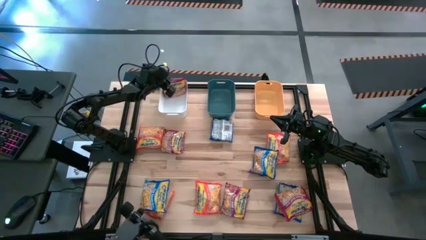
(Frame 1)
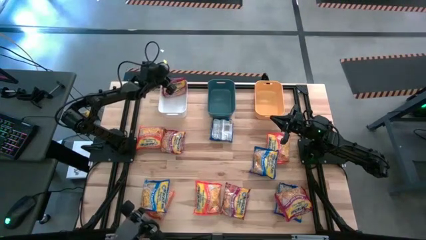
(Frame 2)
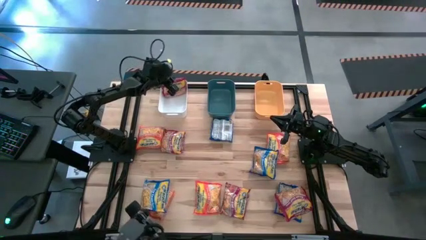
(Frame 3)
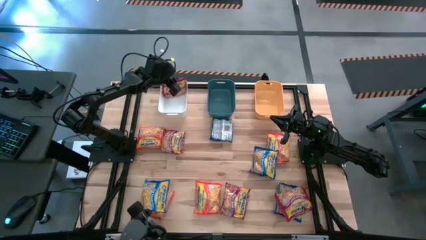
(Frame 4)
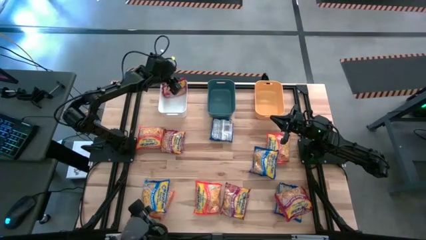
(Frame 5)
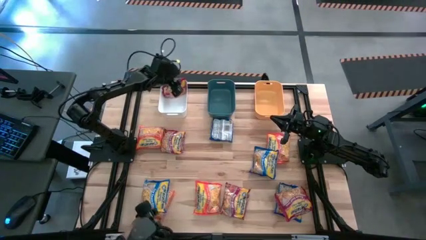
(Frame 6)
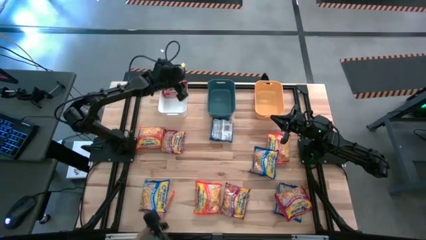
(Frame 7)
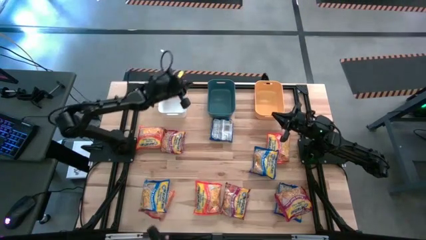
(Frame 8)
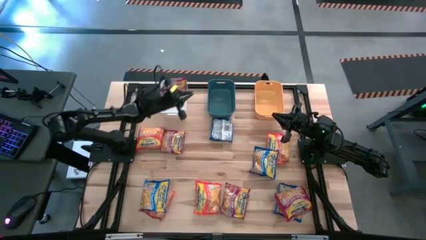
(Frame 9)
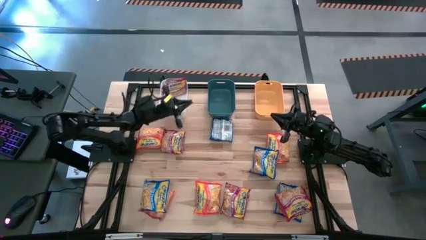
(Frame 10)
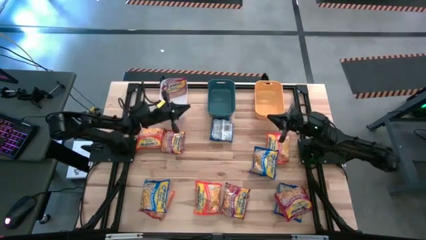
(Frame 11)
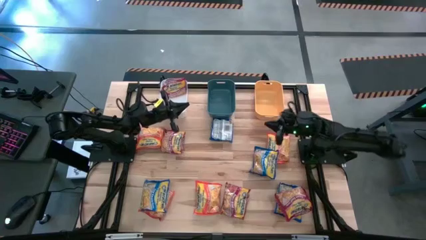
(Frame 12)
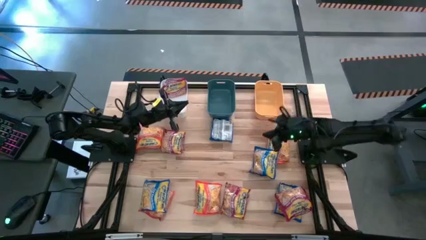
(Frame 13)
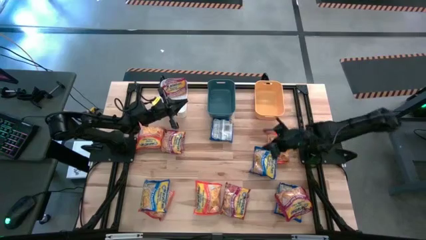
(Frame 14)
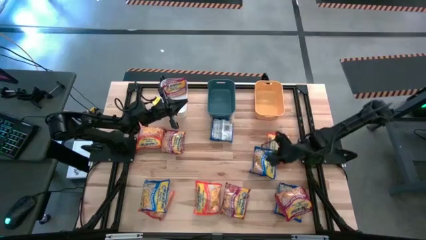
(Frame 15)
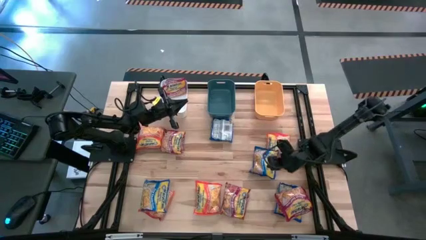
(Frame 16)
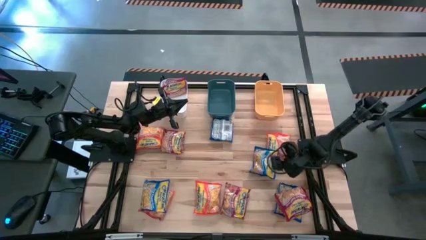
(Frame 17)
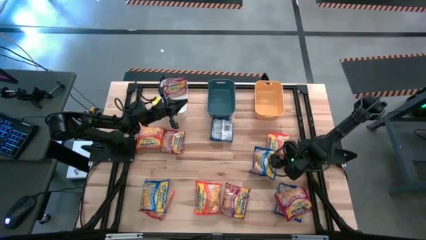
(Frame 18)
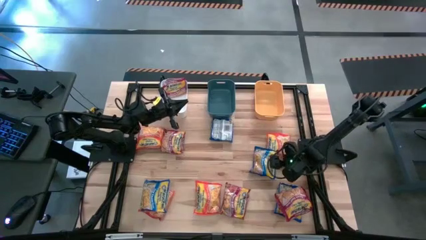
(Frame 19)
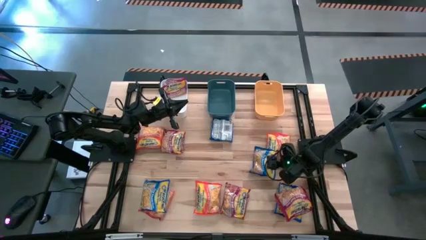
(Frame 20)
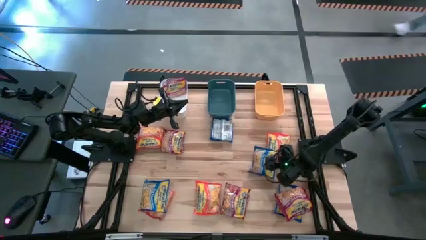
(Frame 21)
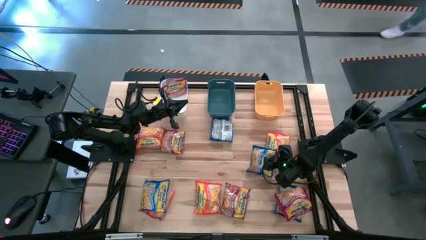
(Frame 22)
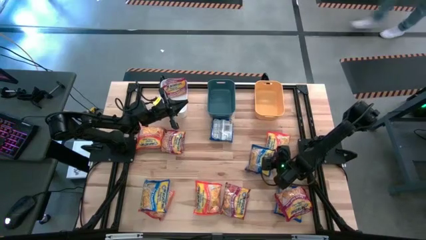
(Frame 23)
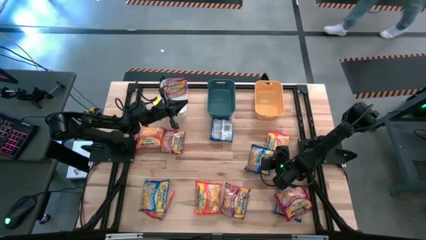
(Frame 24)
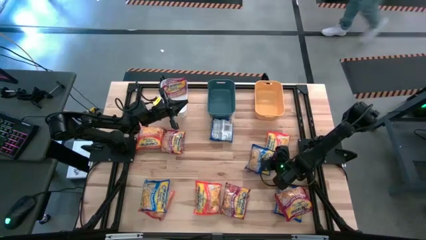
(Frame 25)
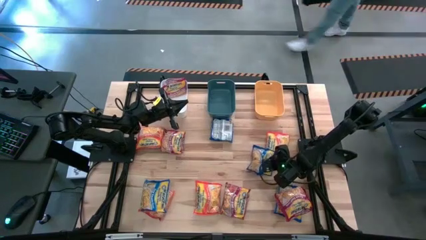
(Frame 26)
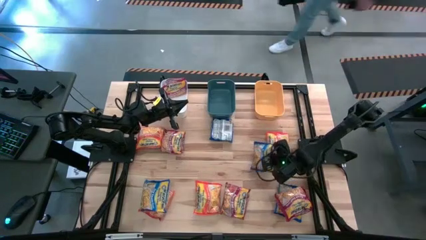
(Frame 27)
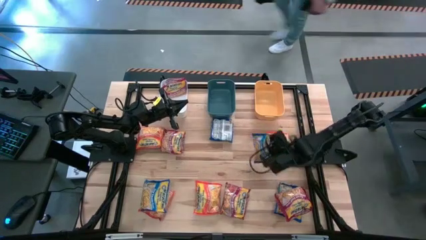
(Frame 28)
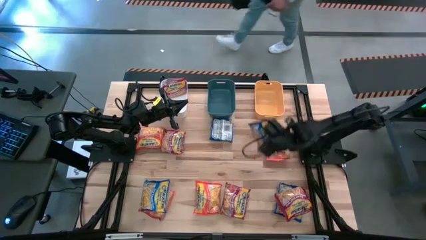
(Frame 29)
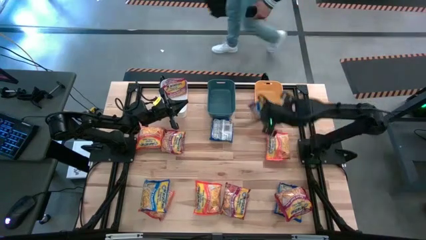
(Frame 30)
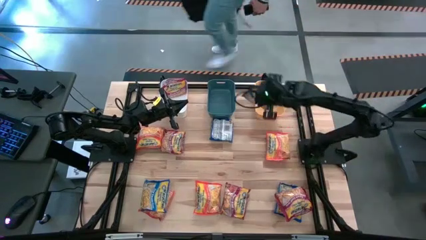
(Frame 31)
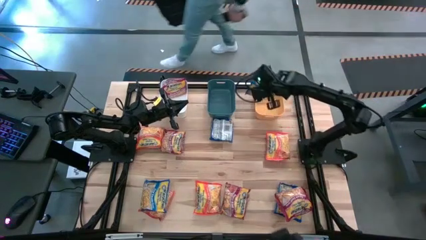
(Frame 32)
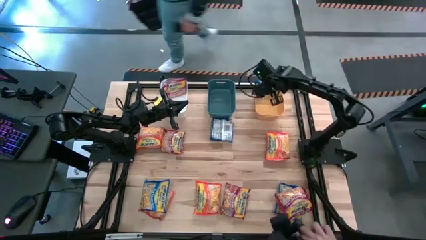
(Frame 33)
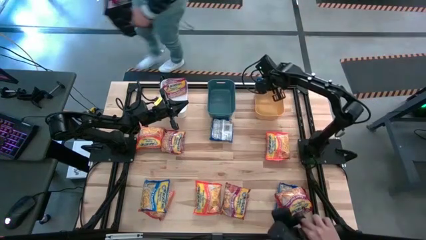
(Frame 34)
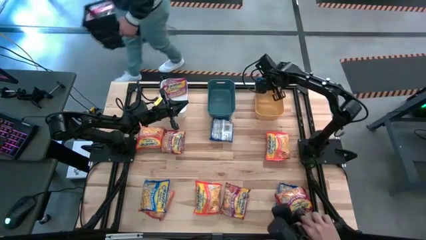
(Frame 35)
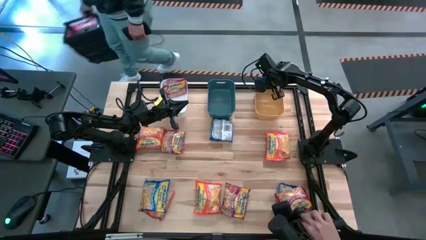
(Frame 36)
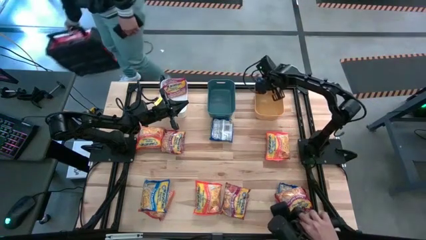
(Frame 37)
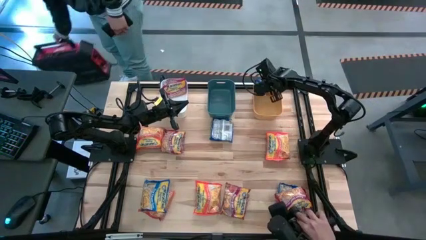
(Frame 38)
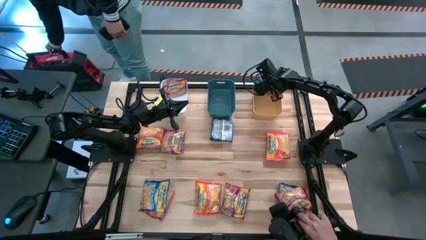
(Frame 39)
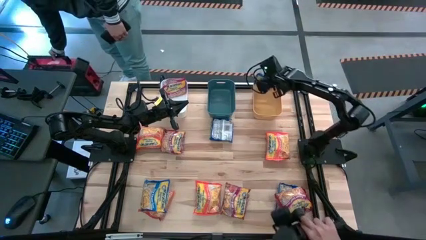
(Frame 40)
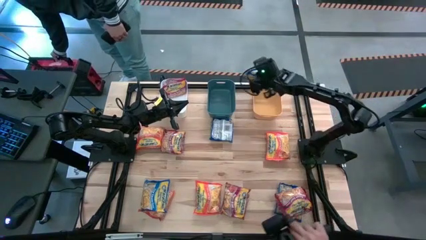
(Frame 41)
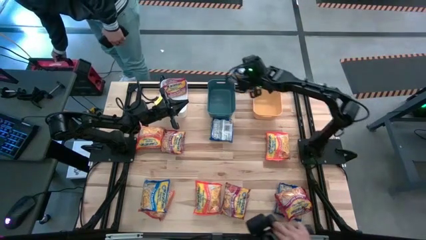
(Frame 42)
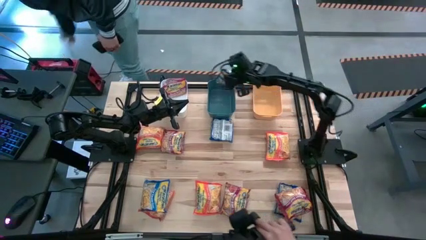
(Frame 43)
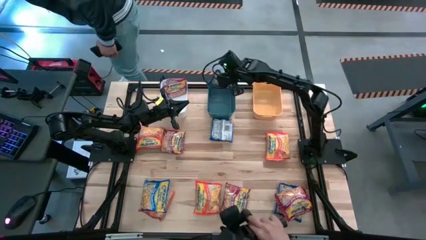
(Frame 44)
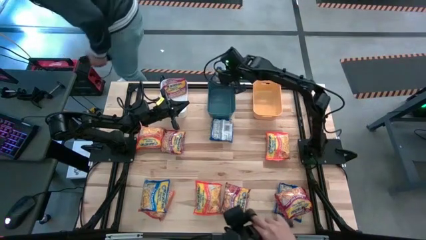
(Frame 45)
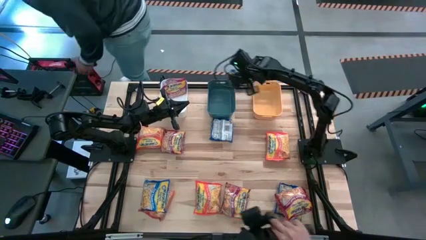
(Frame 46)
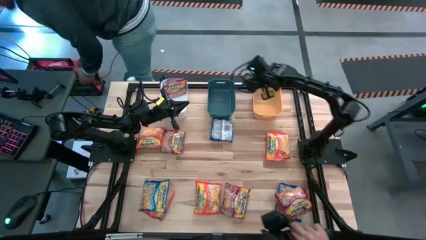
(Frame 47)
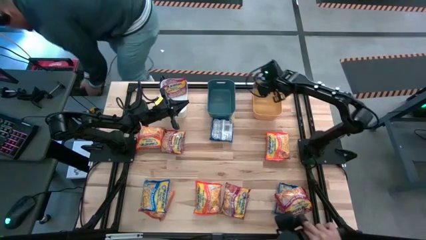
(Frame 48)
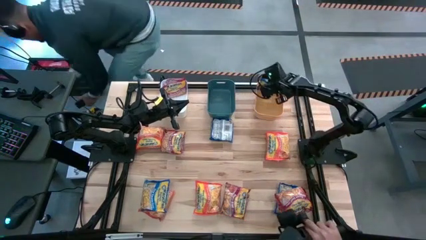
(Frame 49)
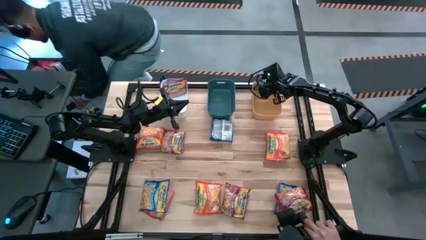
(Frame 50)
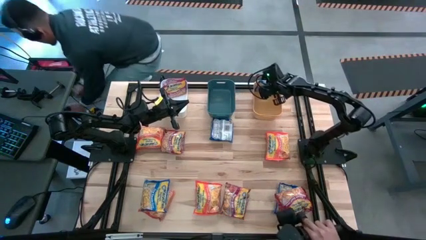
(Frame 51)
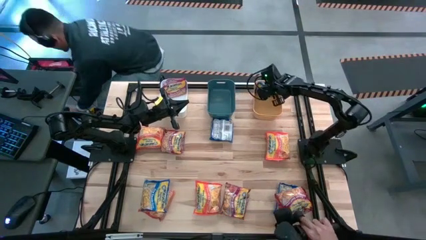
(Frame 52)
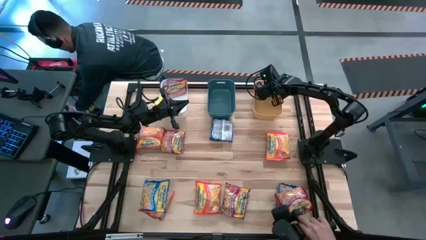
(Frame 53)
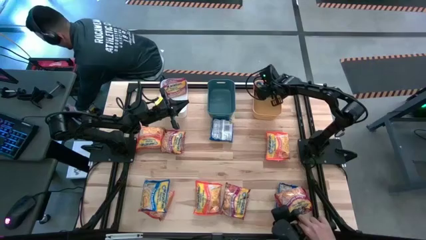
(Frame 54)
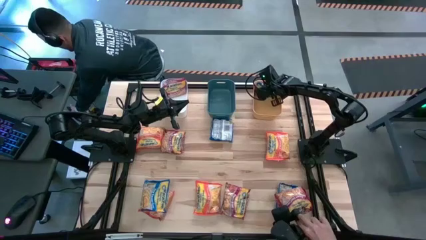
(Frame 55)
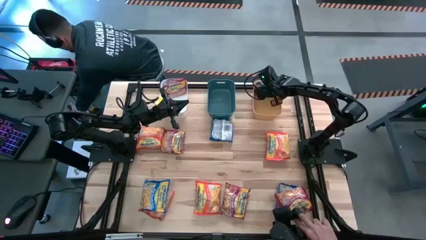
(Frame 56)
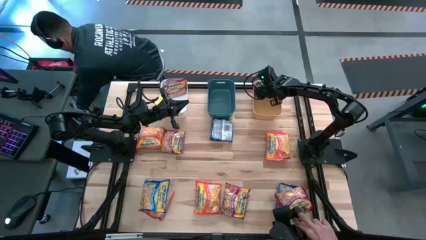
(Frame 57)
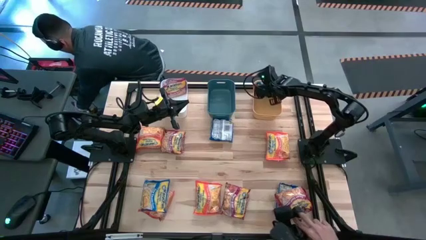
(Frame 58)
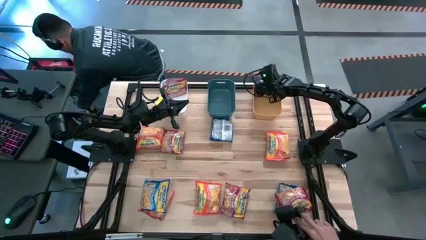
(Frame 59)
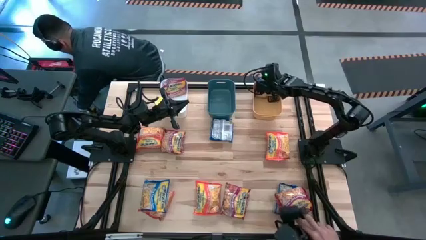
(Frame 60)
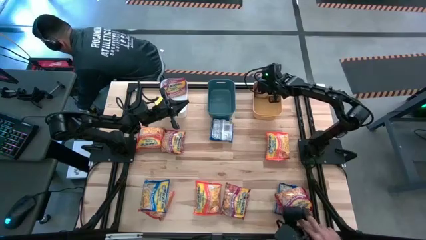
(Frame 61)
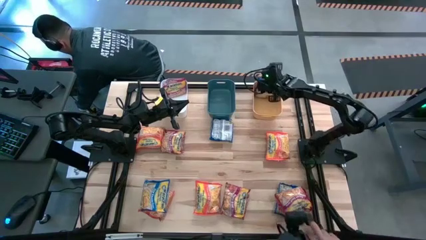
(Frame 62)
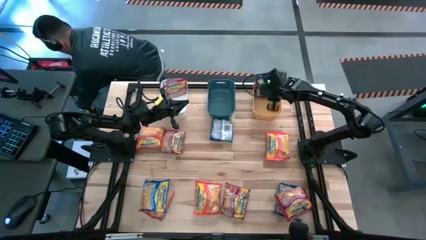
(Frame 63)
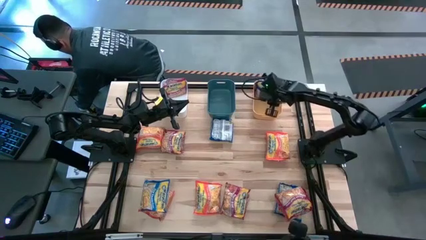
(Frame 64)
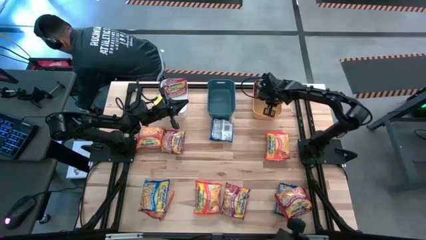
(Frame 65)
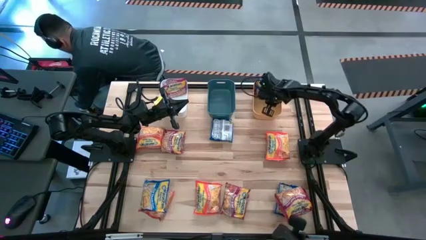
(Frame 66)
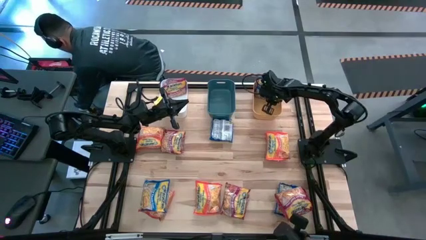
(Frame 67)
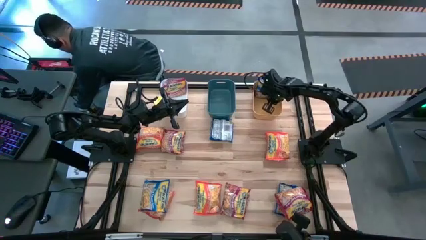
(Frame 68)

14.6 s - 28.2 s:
Task: Sort Maruchan noodles
Put the blue noodle pack into the yellow bin
